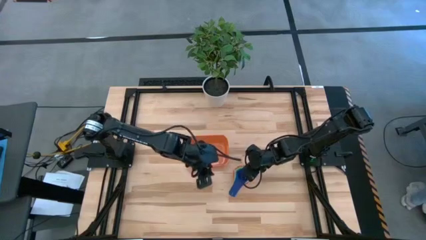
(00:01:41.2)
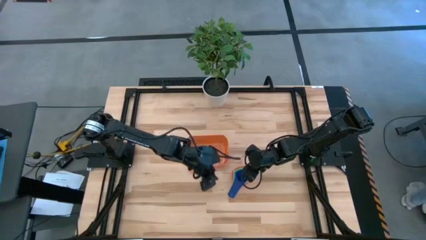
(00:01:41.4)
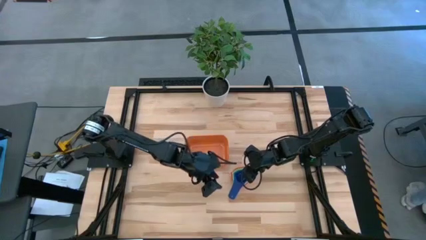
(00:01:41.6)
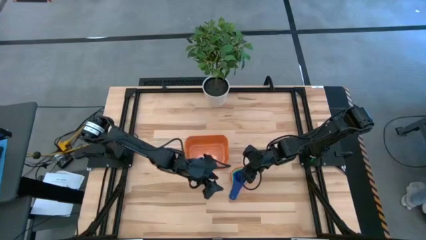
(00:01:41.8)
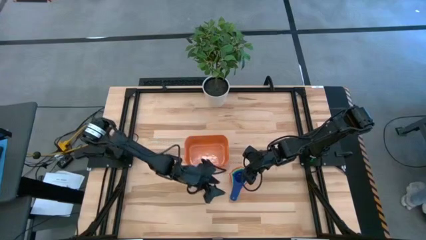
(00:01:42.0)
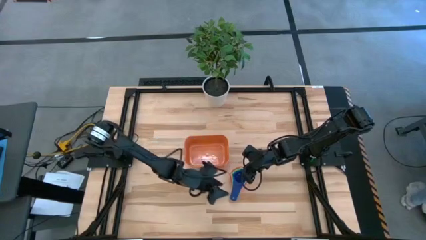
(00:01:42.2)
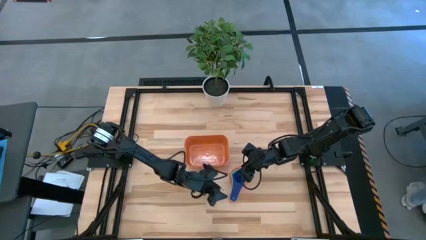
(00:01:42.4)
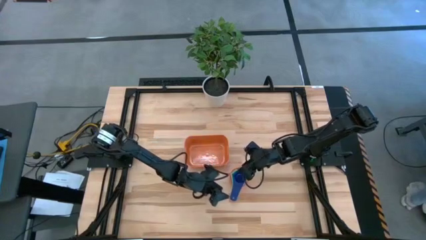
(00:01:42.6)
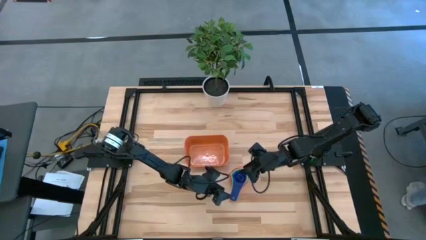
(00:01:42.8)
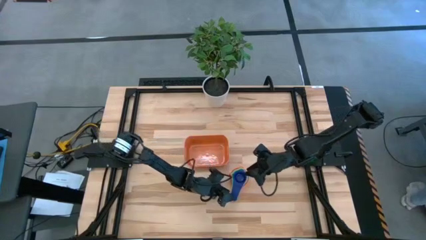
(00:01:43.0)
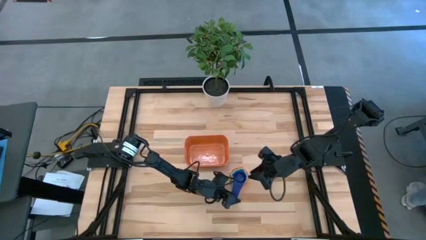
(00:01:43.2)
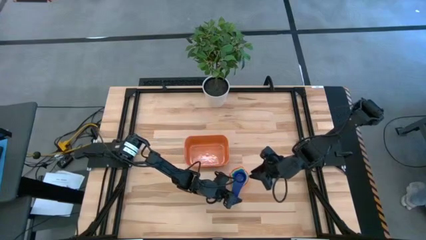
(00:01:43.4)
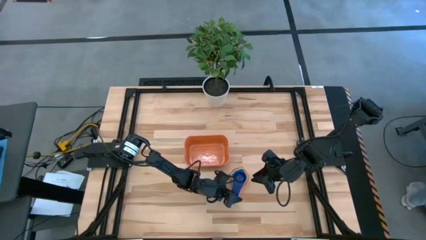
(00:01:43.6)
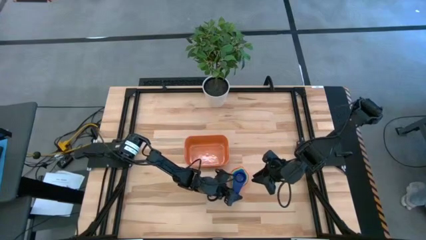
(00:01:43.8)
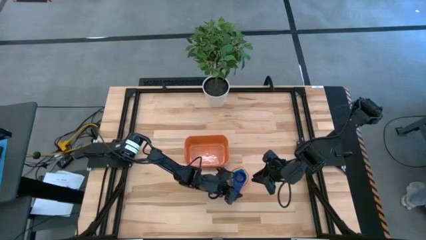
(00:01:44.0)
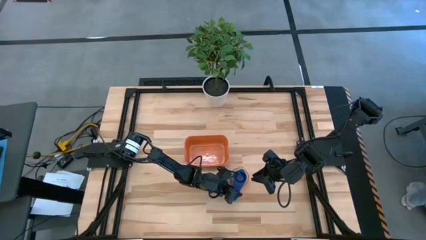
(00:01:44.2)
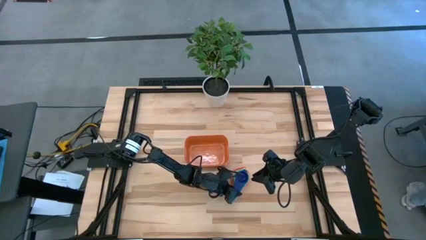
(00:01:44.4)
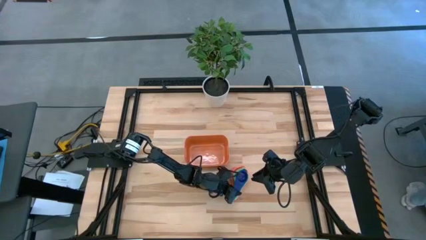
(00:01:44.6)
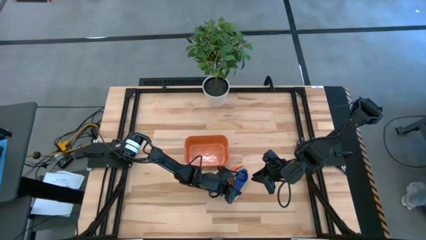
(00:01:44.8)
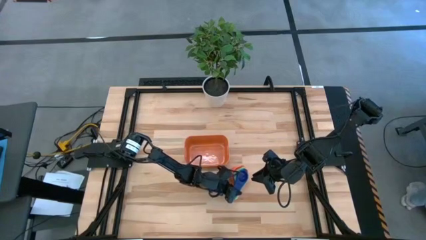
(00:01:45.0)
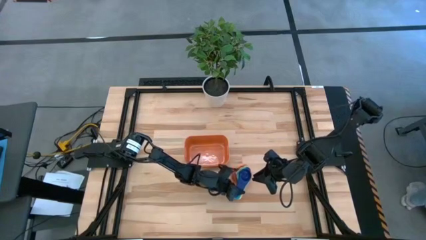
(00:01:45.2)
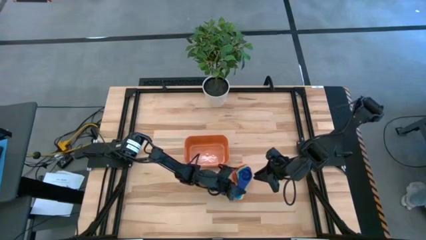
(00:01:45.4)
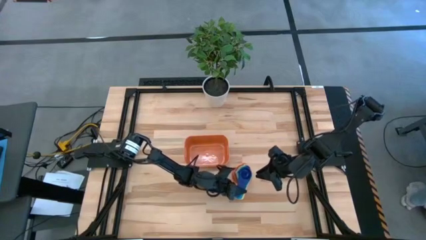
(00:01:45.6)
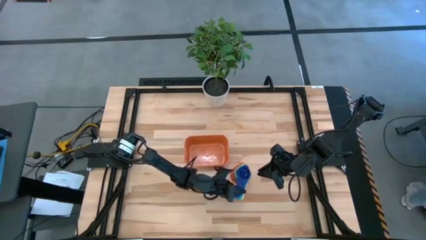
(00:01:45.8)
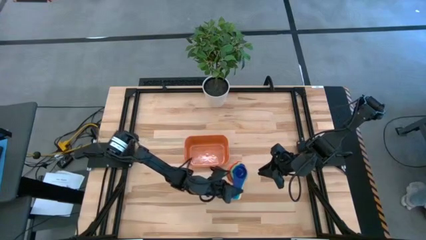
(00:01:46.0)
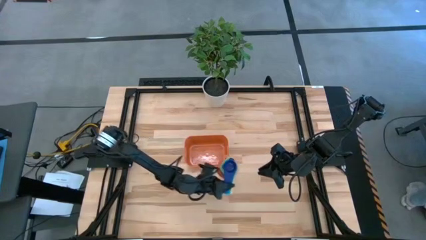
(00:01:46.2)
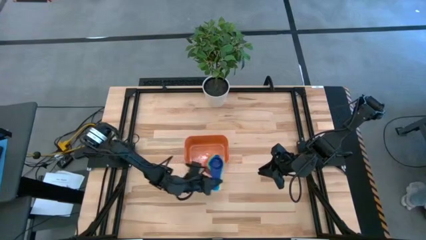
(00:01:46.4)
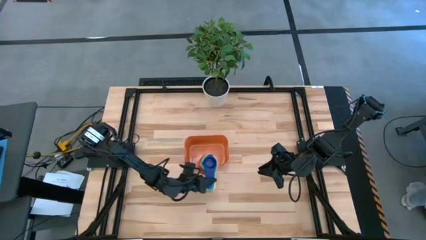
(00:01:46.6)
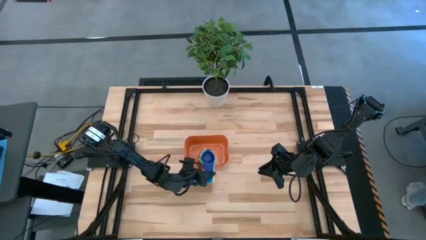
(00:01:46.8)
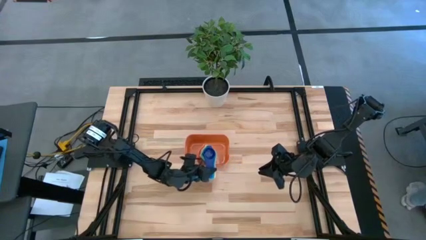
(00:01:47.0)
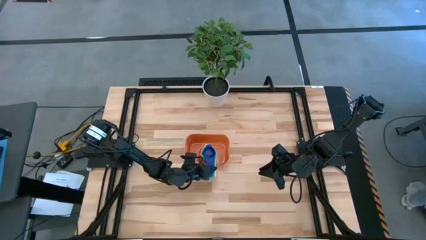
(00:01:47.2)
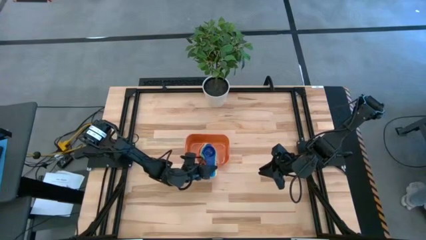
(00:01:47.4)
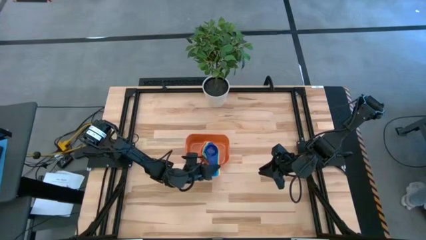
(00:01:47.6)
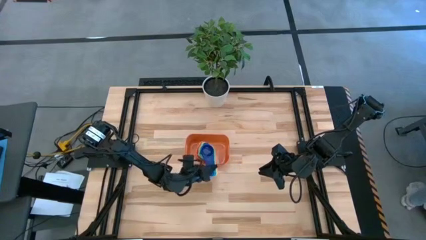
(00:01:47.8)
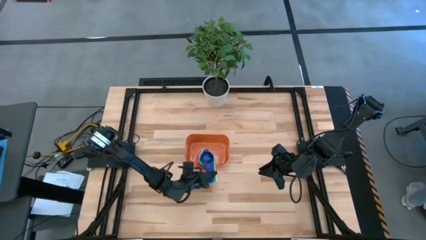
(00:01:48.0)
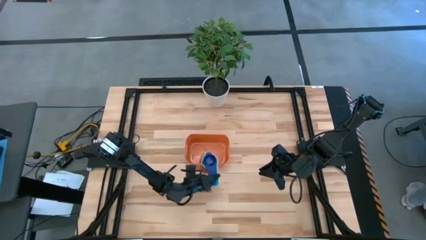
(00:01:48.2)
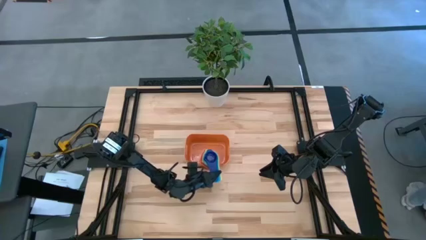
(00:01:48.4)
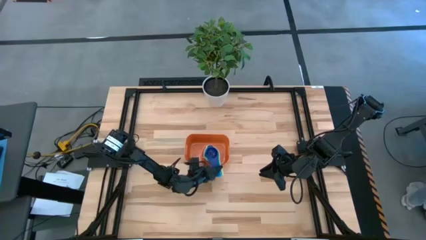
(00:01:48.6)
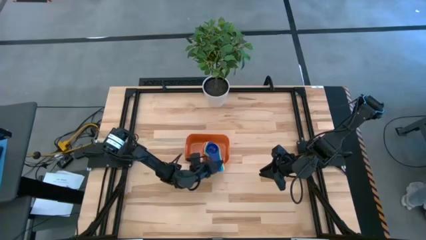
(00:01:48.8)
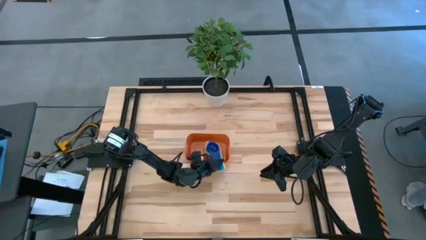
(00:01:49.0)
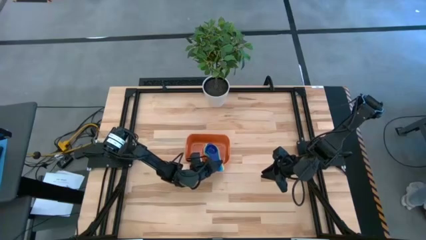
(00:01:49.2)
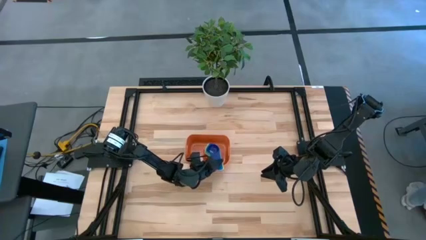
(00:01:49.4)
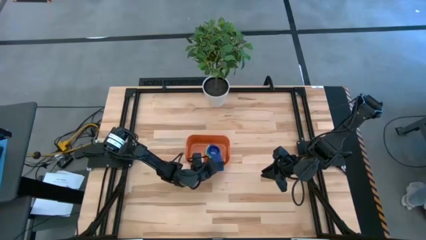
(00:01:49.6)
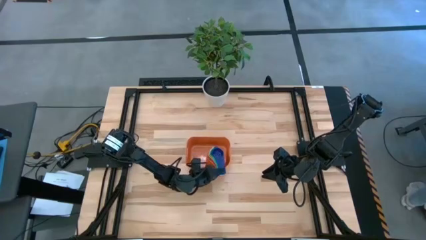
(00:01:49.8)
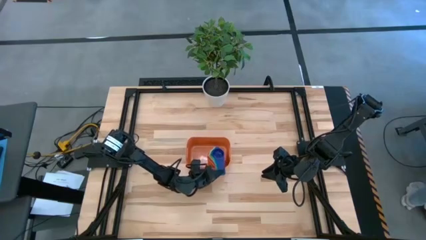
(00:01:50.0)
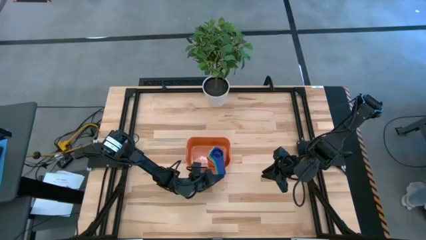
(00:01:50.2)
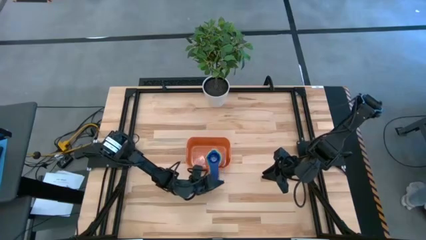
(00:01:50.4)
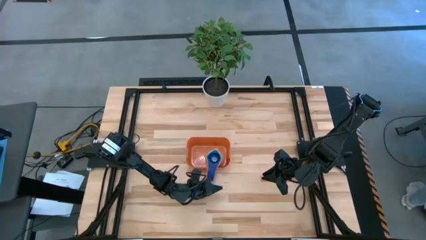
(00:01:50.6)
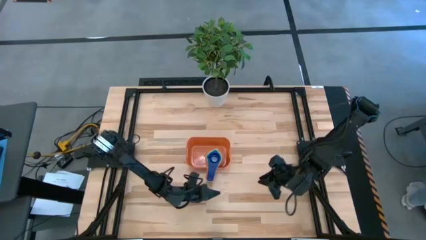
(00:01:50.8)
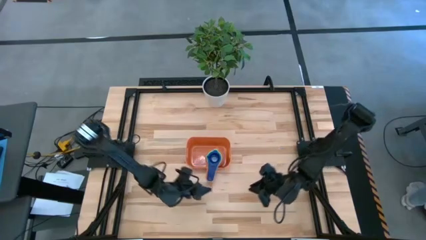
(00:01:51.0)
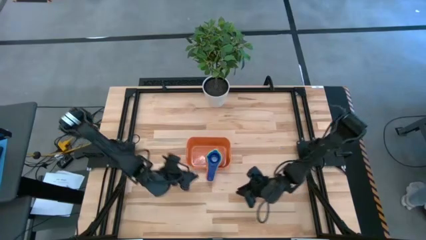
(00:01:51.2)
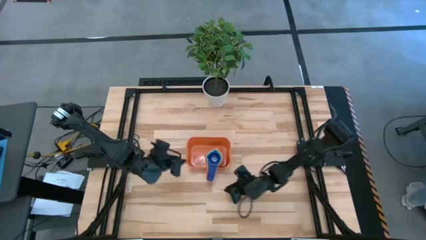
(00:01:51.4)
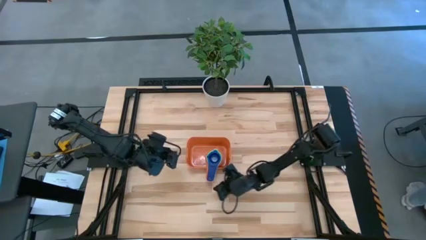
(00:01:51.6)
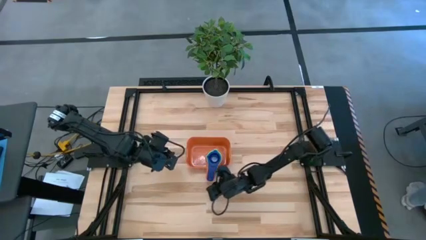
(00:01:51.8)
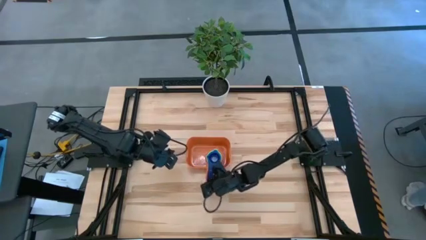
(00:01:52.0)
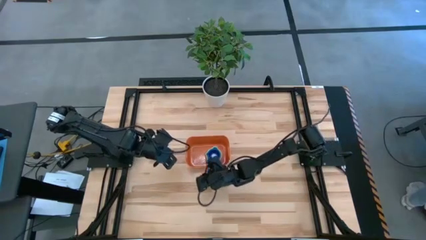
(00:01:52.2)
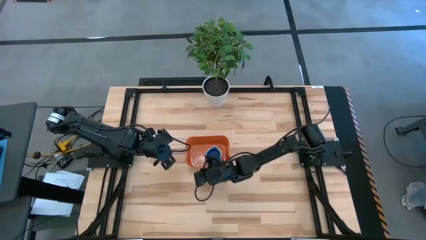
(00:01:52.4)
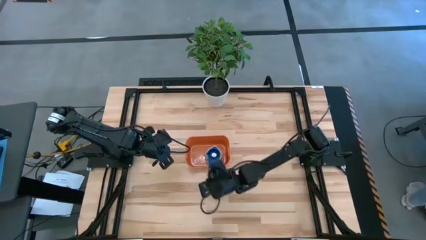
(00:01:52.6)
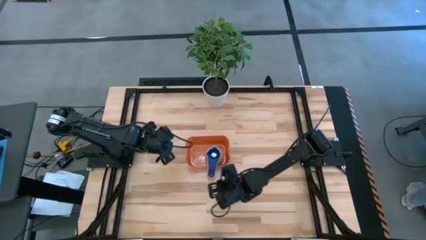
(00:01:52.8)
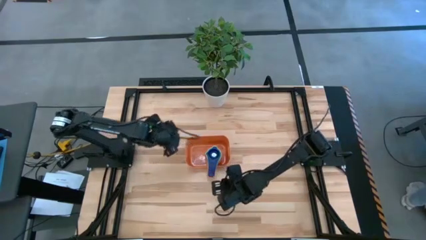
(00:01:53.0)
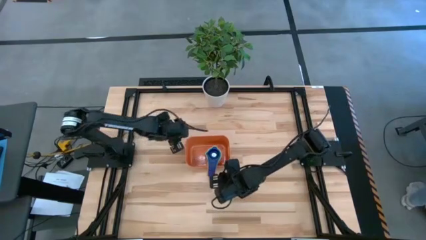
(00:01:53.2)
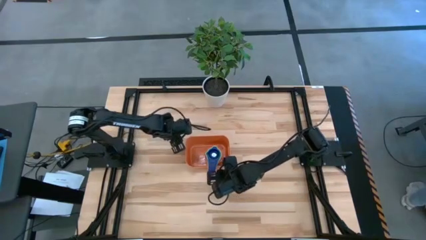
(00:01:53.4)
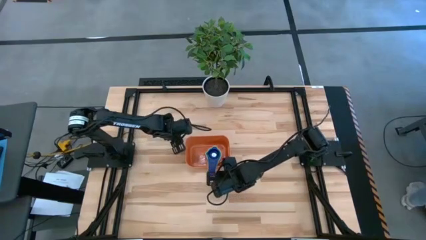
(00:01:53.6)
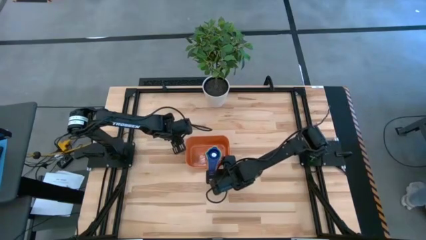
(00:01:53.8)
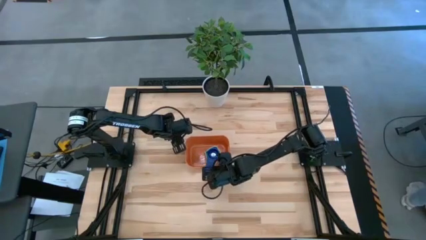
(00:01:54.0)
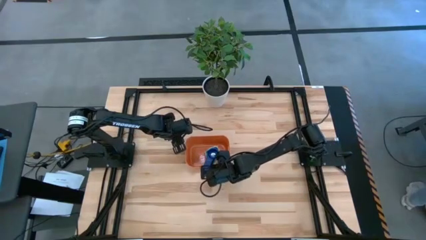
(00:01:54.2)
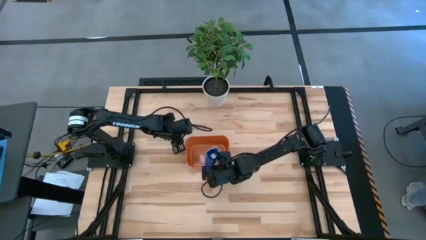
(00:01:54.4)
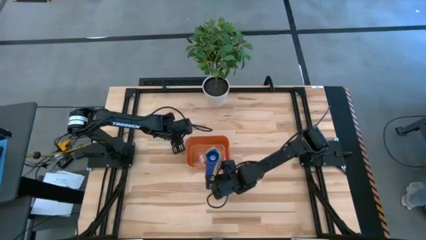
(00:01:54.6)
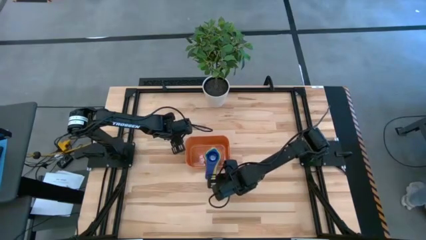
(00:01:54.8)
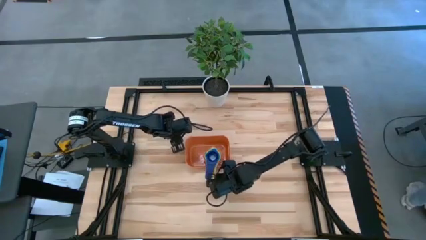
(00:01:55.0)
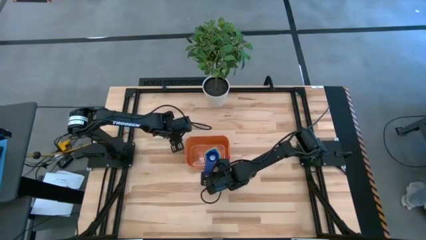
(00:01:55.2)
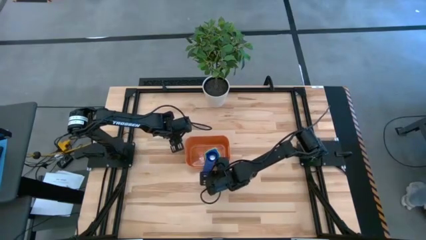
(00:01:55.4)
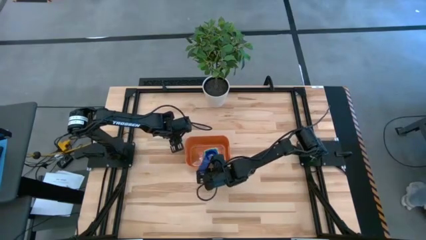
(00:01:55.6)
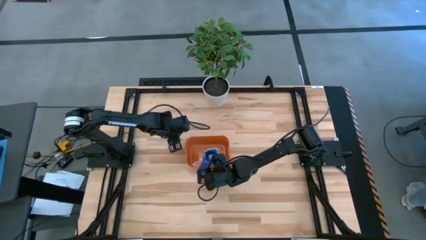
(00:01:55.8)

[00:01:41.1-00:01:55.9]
Task: Nest measuring cups in basket
Put the nested measuring cups into the orange bin
